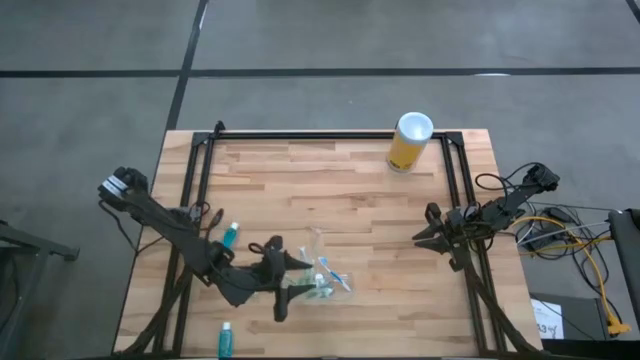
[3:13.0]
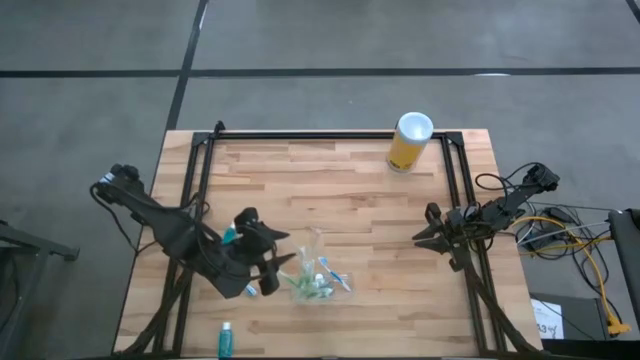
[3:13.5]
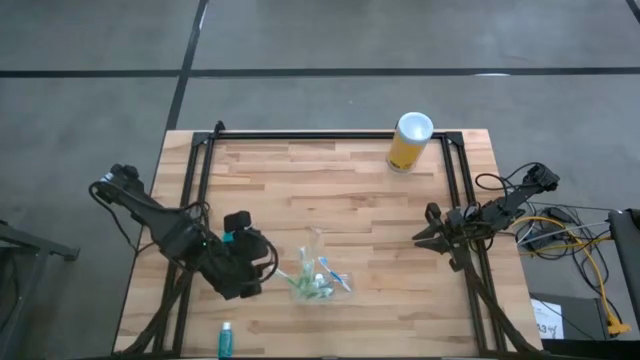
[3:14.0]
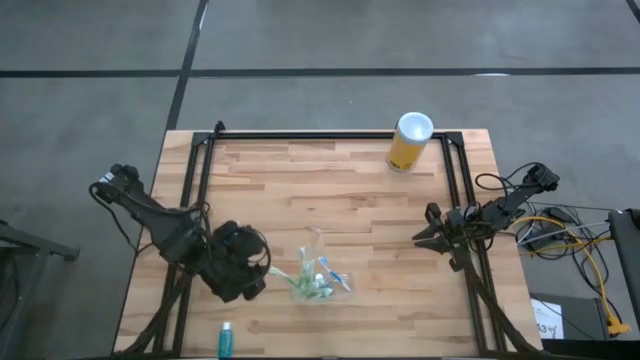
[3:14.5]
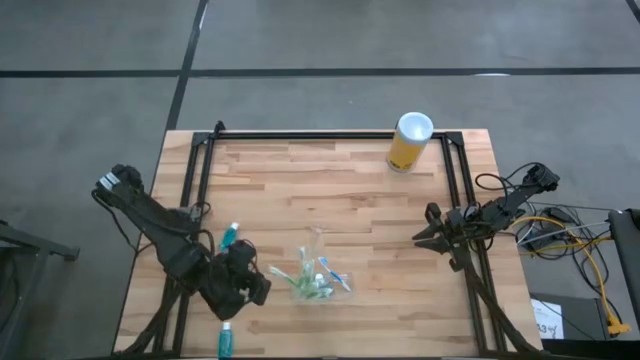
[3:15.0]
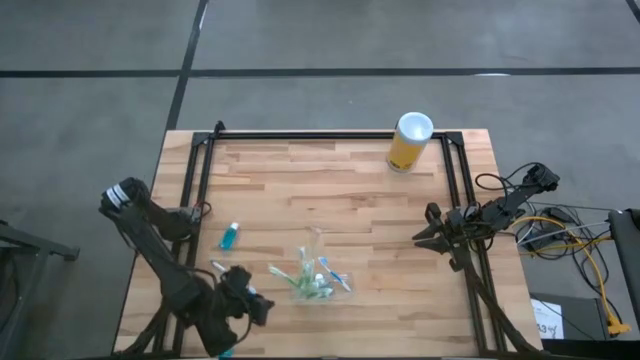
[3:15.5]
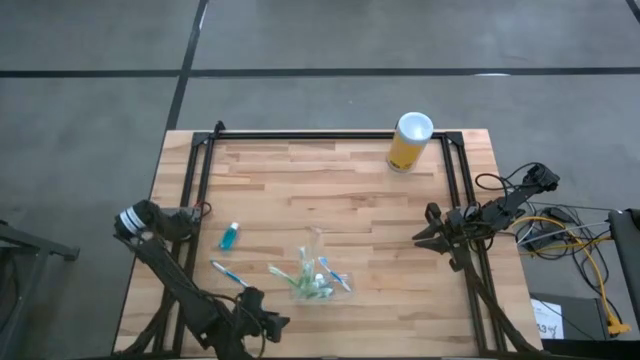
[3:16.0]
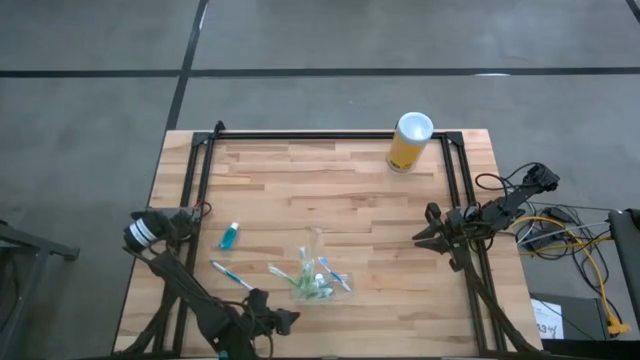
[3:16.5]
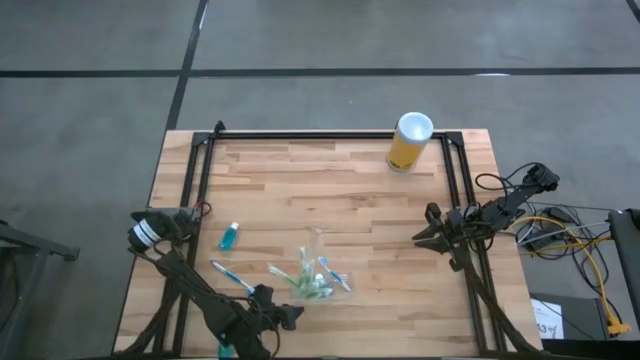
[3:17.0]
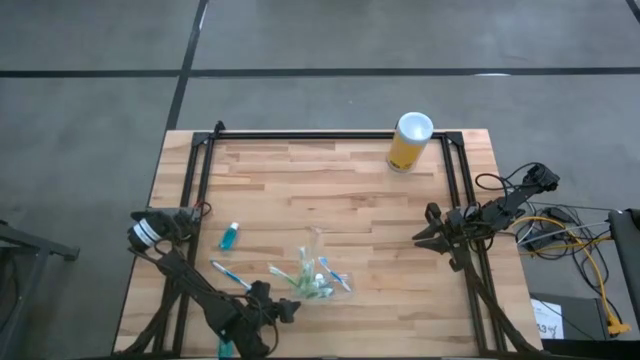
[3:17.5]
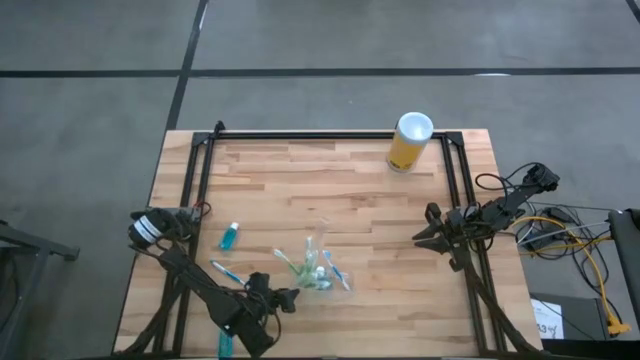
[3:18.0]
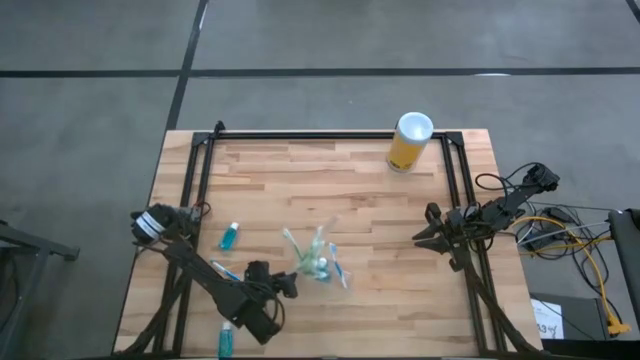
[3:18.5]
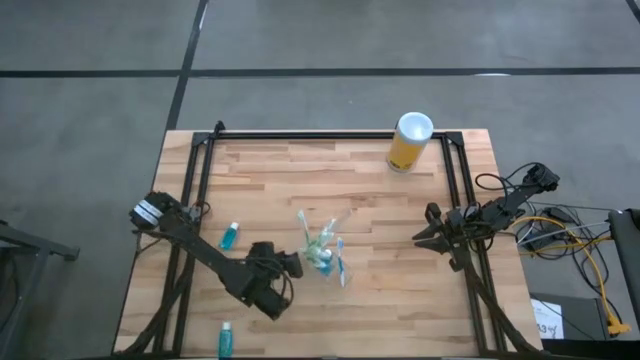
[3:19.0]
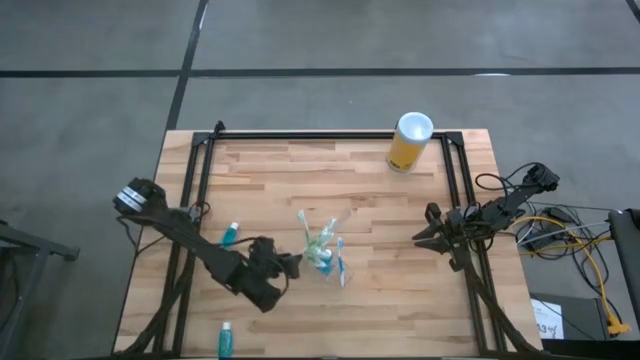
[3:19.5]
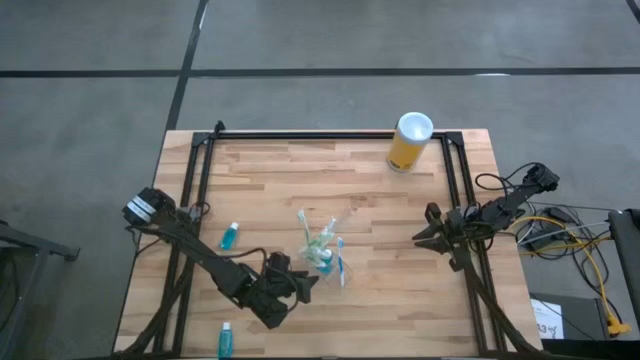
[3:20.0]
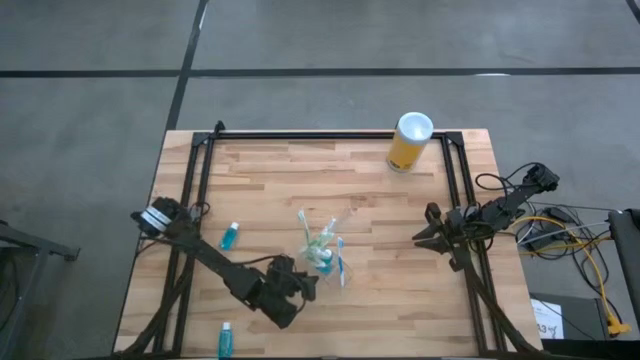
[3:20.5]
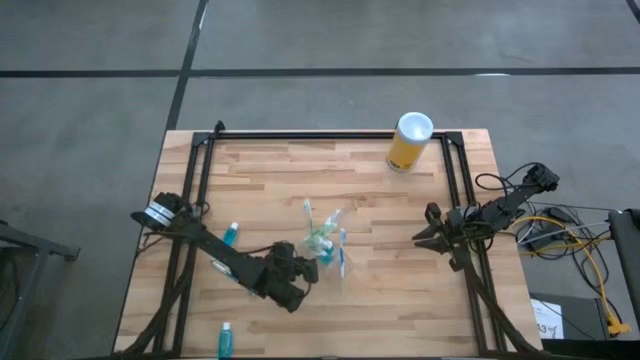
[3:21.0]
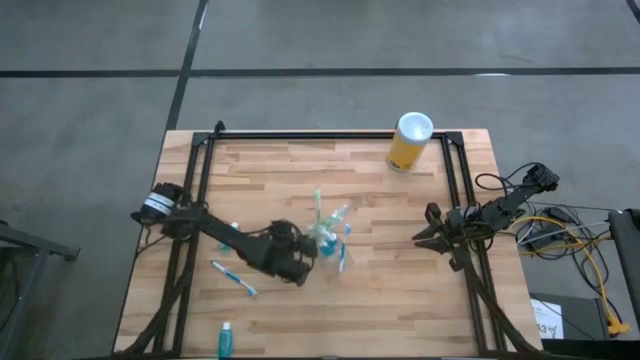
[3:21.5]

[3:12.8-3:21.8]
Task: Pick & Place toothbrushing station
Move the transparent organizer to the center of the table

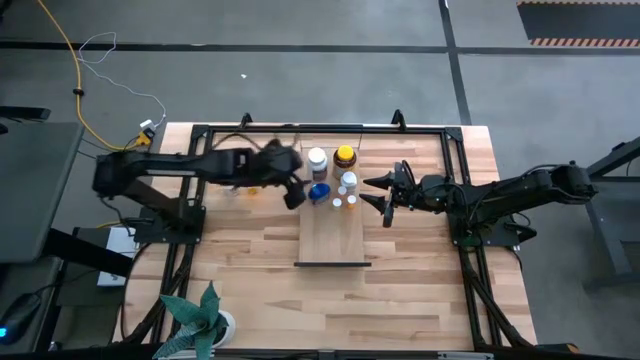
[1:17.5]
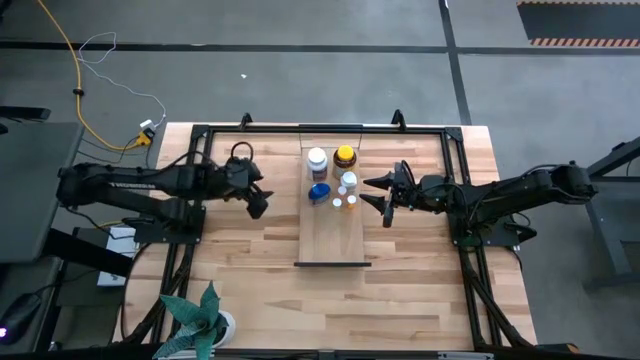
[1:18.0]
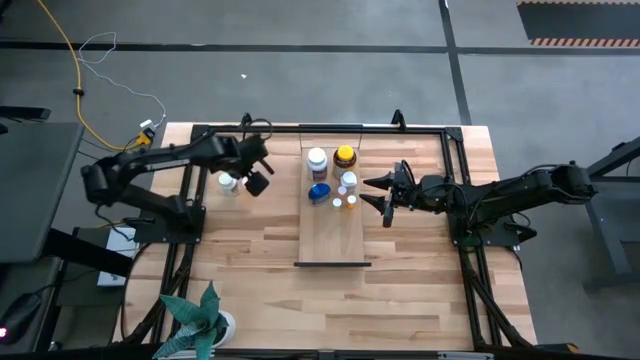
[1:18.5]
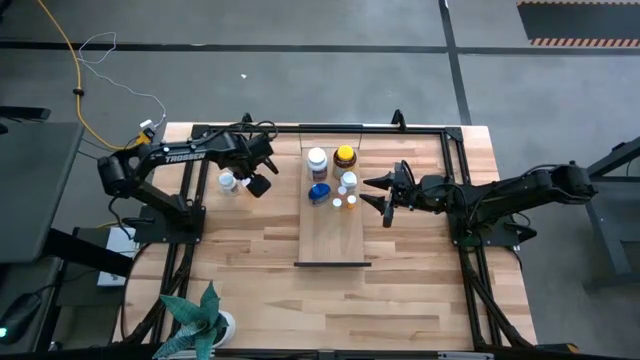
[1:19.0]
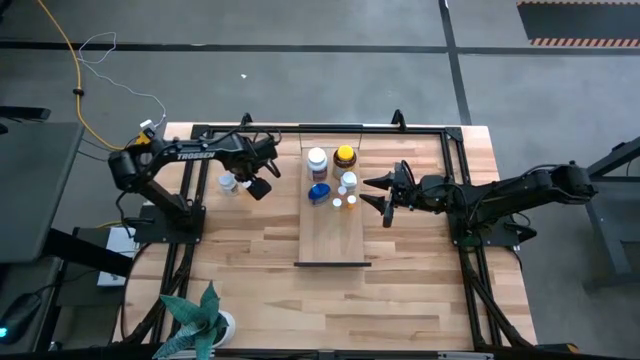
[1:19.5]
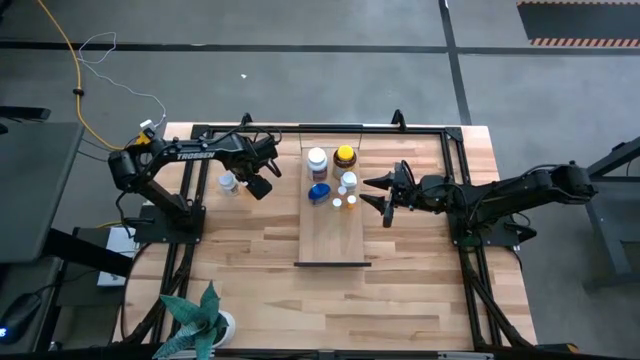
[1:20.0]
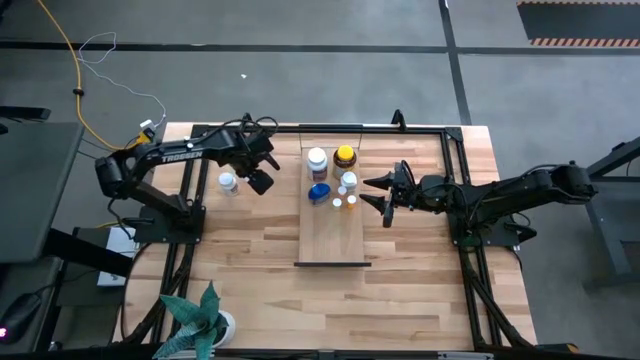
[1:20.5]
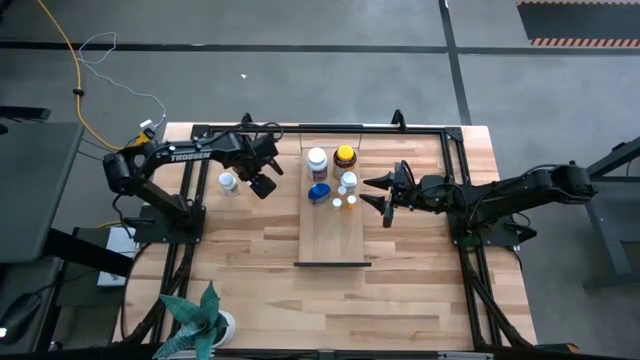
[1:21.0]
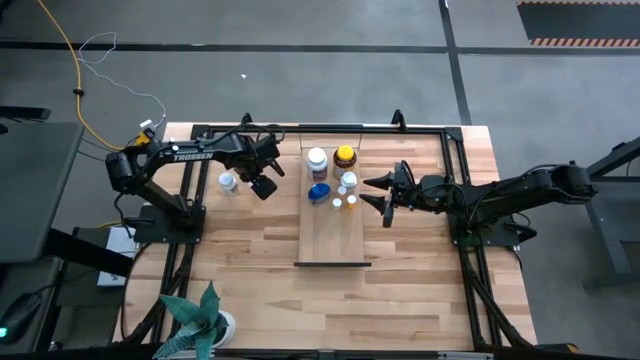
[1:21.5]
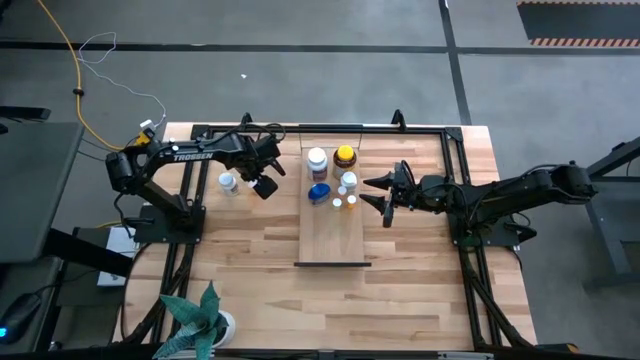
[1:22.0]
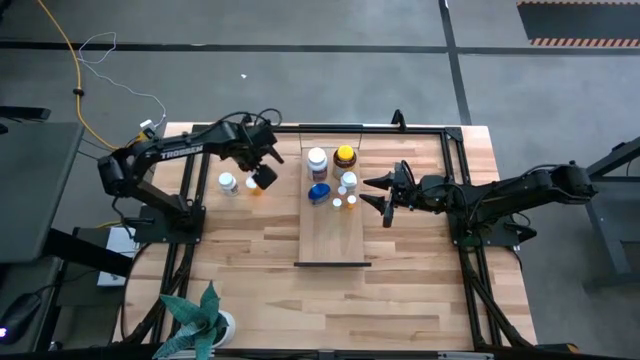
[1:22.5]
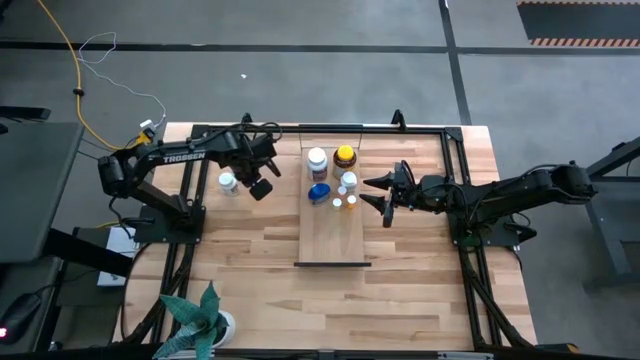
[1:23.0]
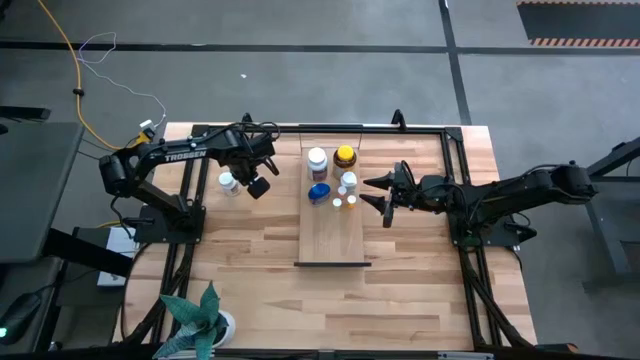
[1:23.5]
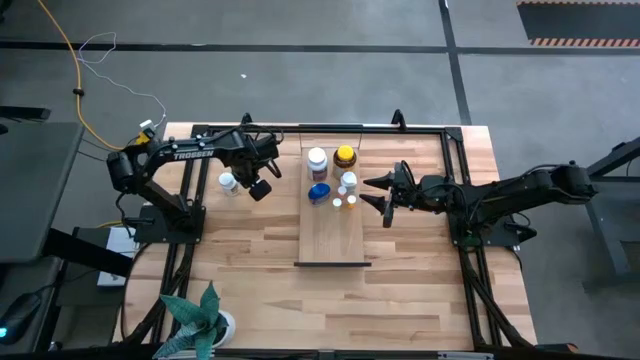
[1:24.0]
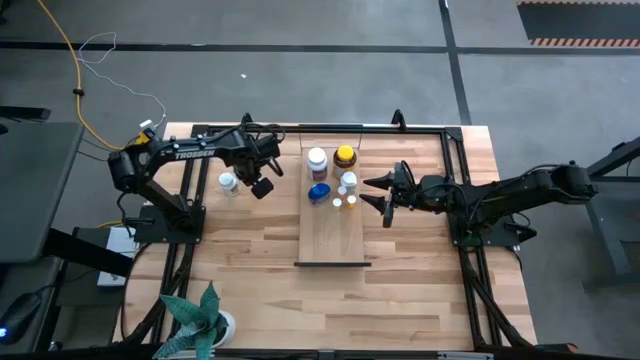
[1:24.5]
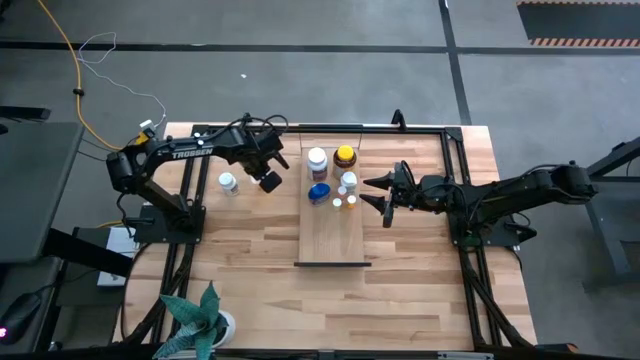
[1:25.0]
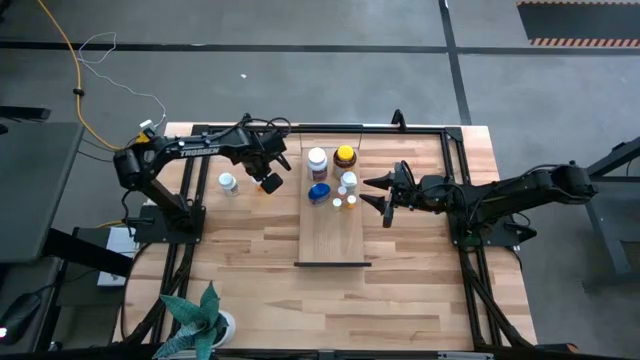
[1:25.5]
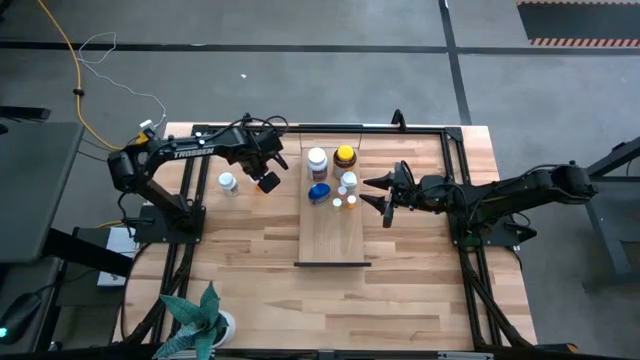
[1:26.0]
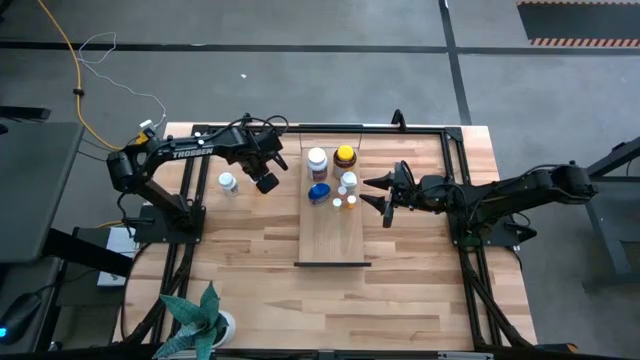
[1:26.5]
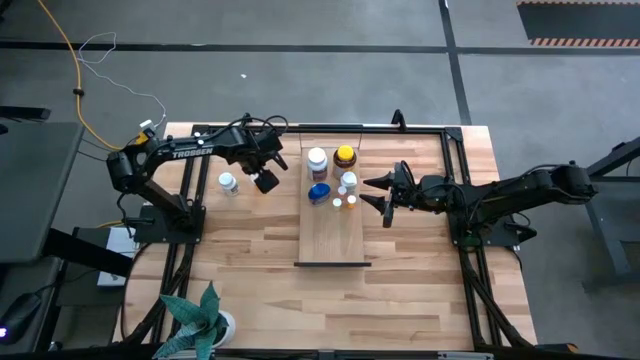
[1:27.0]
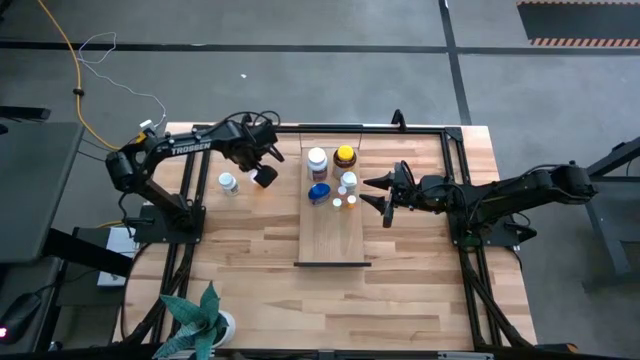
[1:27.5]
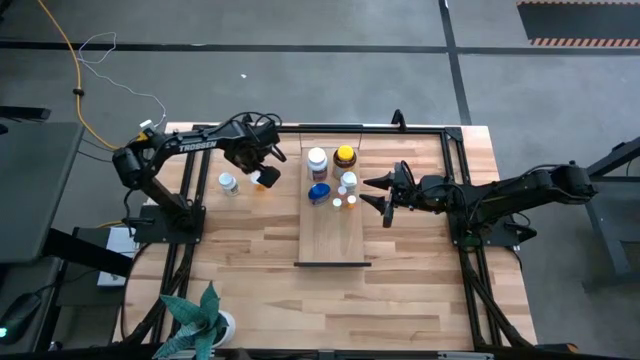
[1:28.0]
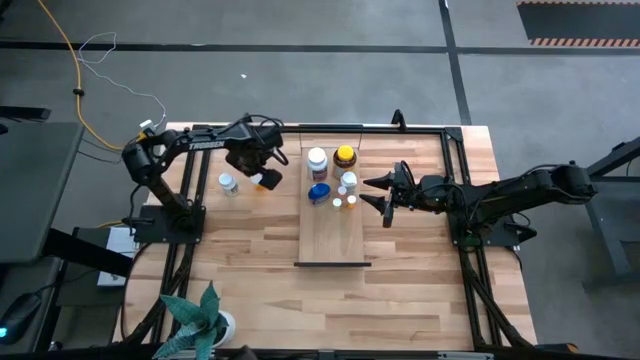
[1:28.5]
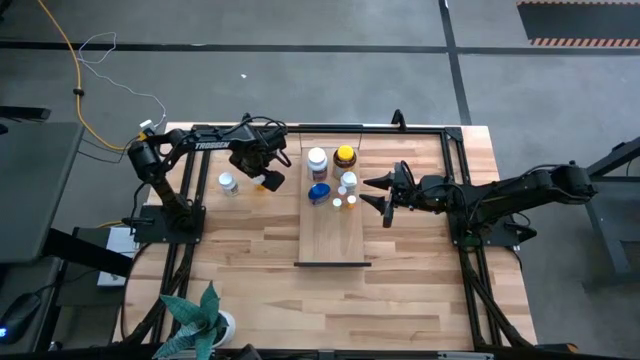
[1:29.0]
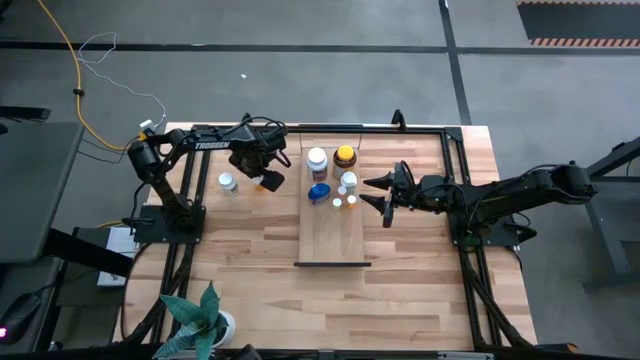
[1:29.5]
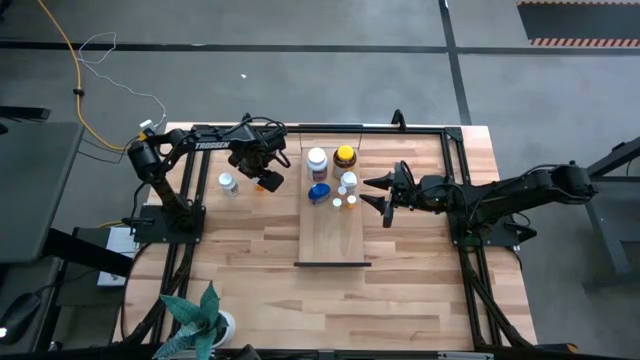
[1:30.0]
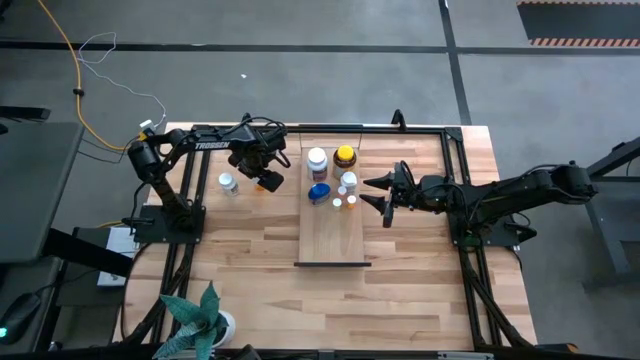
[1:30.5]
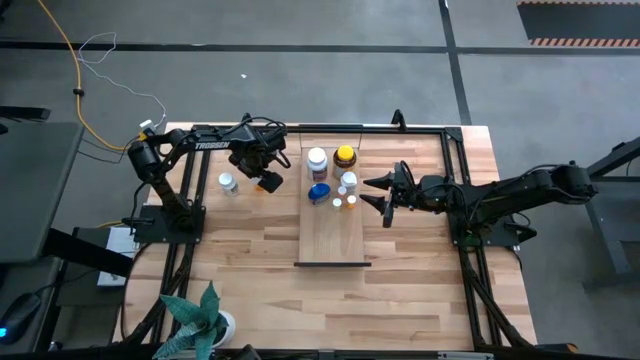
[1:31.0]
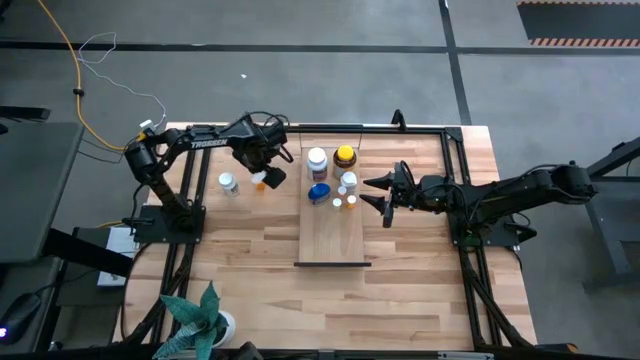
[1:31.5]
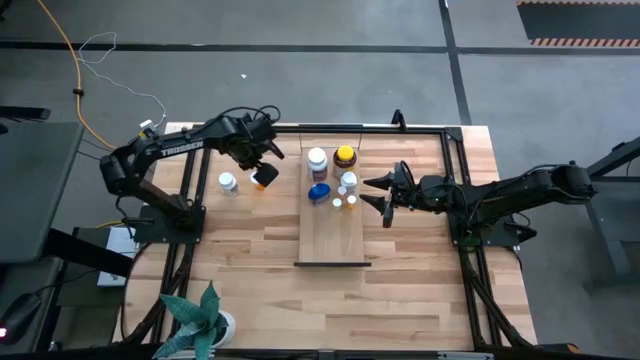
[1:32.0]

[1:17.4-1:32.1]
Task: Pick and place medicine bottles onto shelf by color
Put the medium orange pill bottle on the shelf
